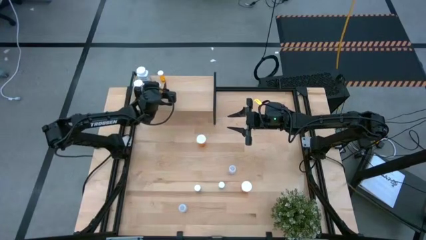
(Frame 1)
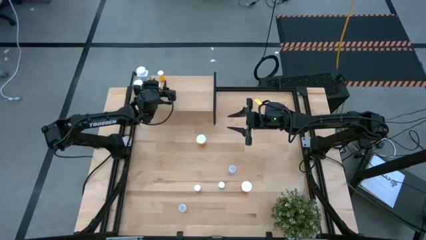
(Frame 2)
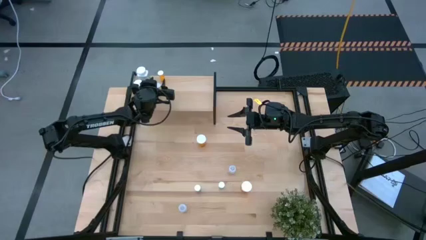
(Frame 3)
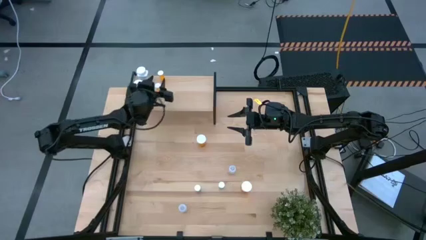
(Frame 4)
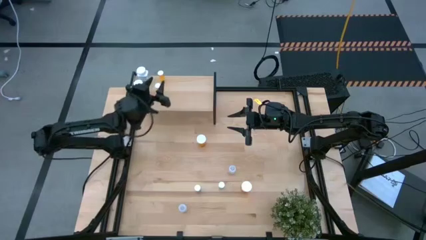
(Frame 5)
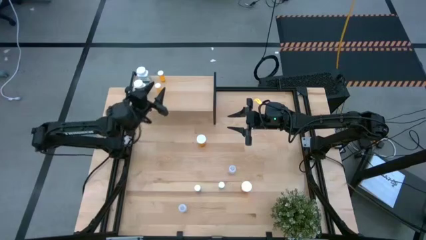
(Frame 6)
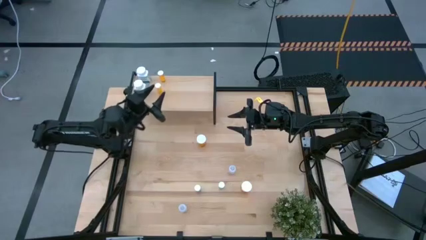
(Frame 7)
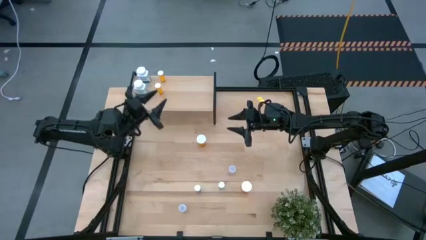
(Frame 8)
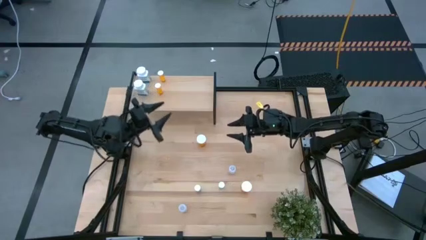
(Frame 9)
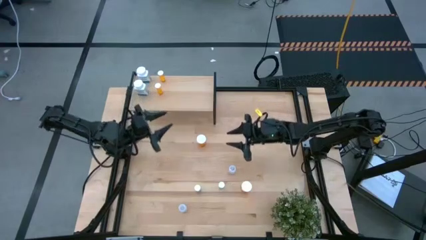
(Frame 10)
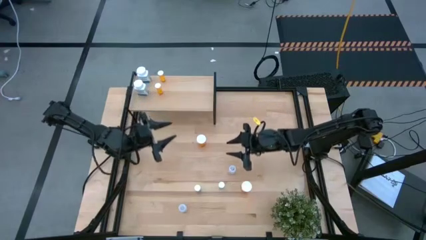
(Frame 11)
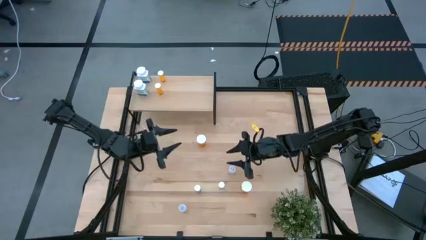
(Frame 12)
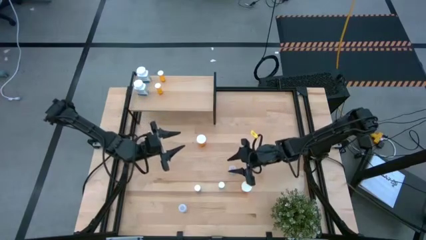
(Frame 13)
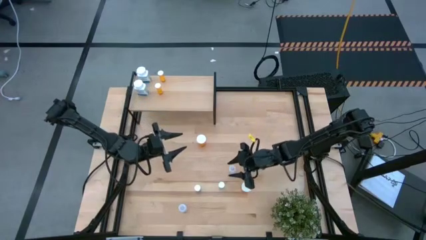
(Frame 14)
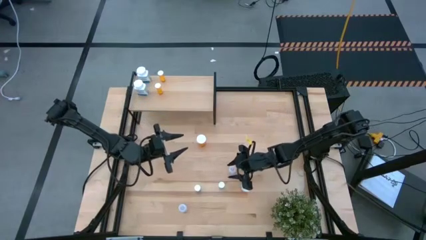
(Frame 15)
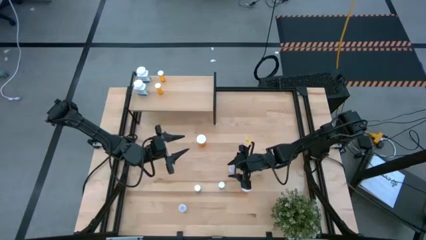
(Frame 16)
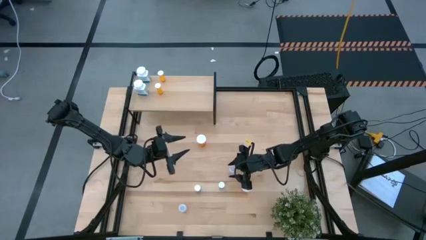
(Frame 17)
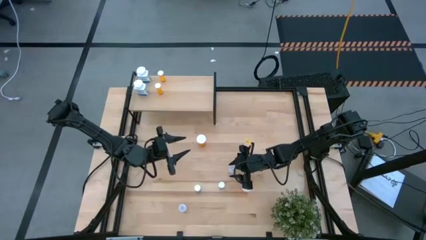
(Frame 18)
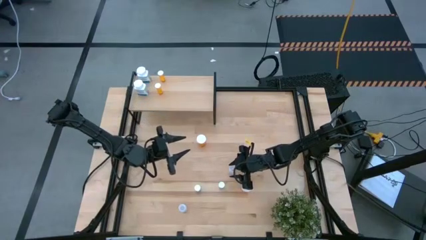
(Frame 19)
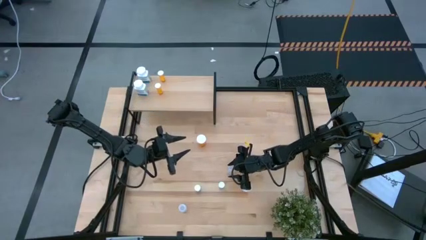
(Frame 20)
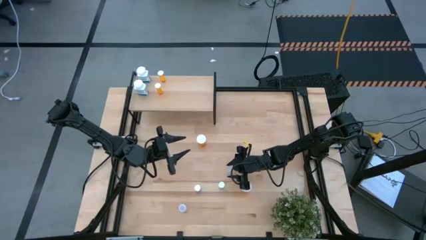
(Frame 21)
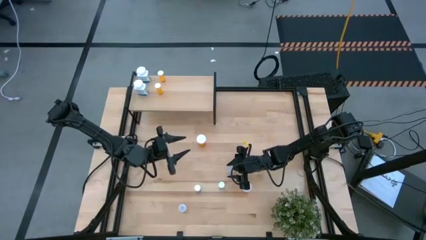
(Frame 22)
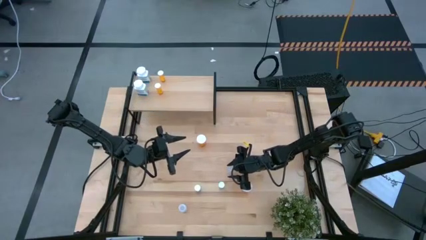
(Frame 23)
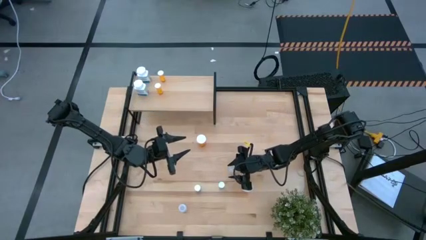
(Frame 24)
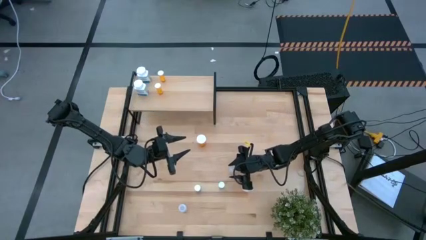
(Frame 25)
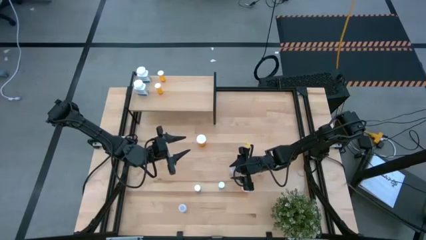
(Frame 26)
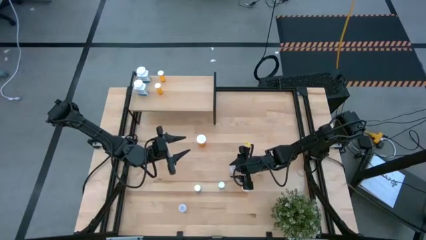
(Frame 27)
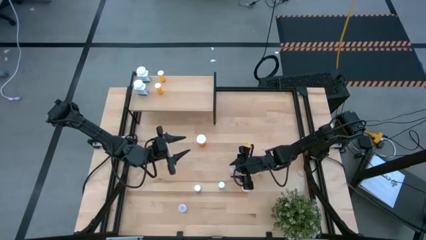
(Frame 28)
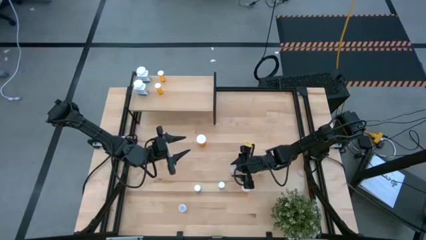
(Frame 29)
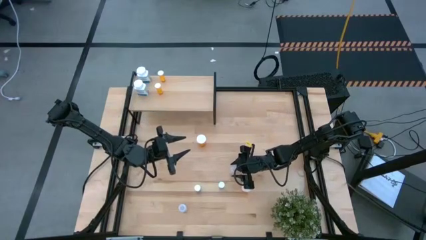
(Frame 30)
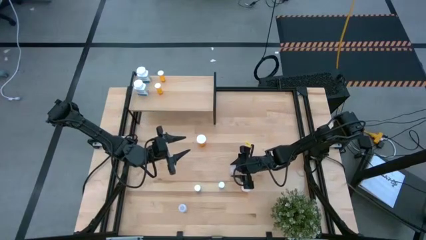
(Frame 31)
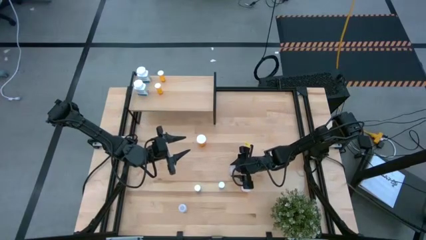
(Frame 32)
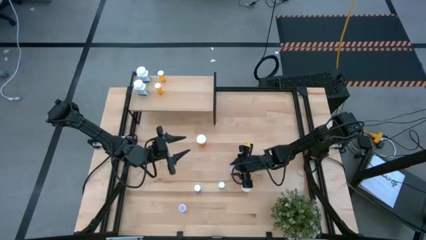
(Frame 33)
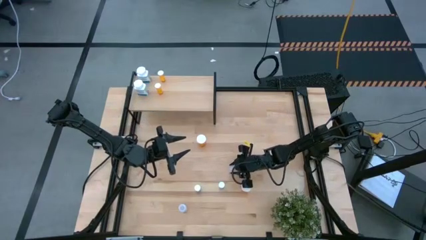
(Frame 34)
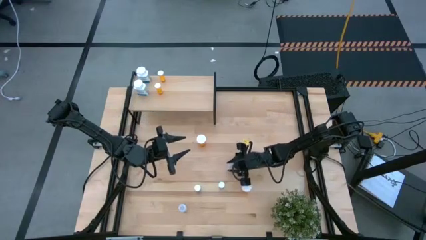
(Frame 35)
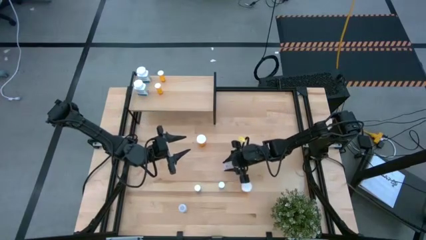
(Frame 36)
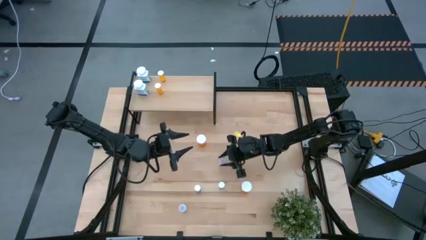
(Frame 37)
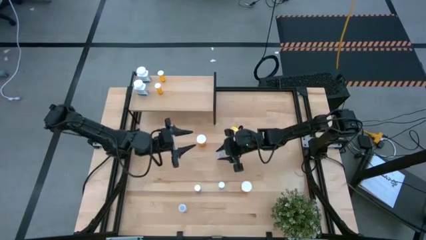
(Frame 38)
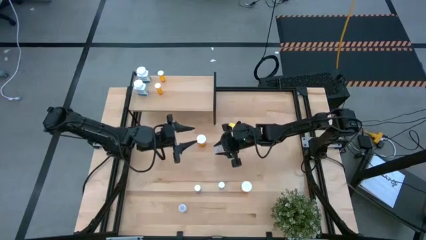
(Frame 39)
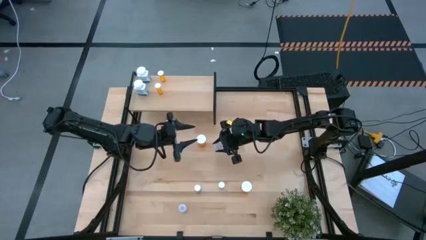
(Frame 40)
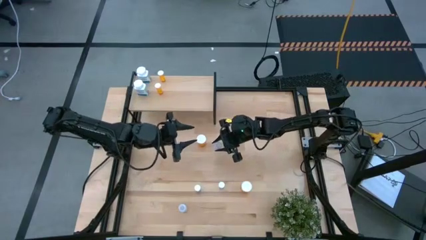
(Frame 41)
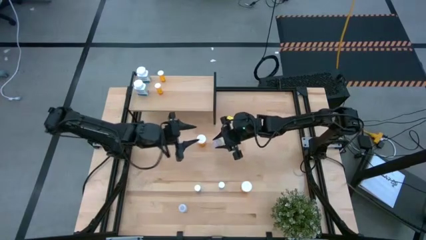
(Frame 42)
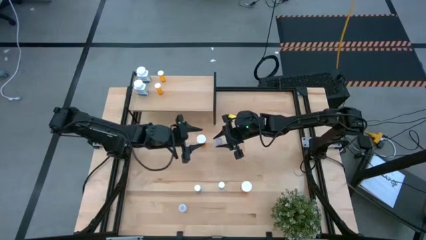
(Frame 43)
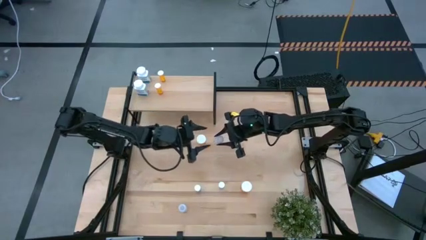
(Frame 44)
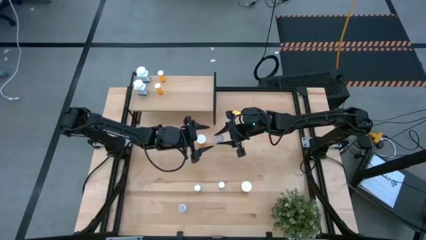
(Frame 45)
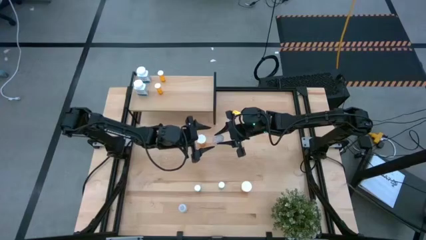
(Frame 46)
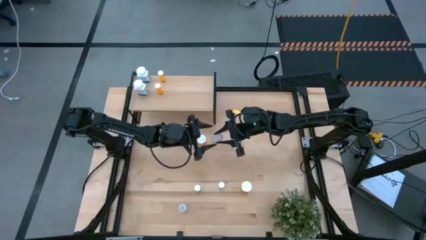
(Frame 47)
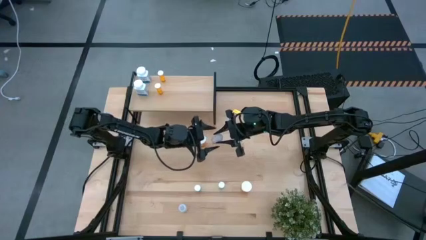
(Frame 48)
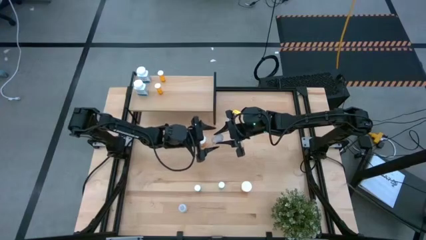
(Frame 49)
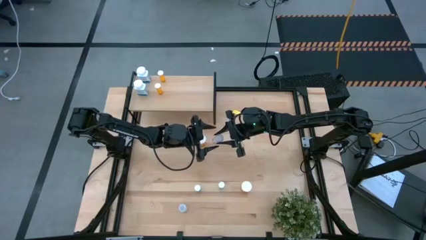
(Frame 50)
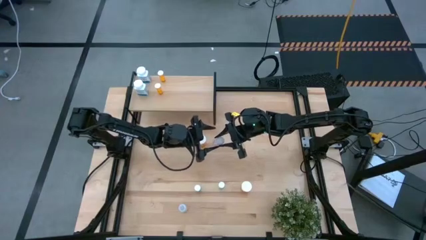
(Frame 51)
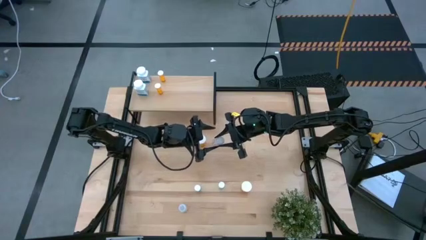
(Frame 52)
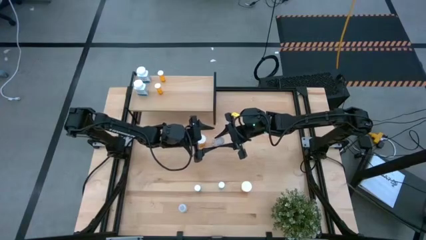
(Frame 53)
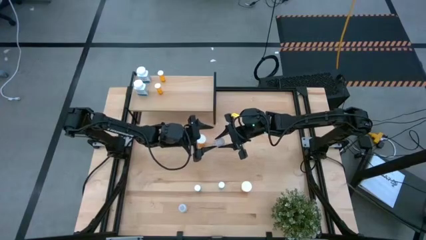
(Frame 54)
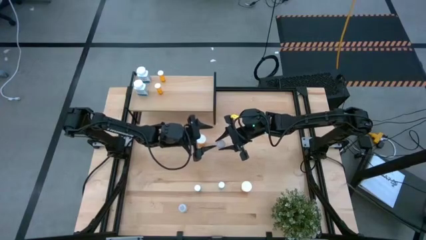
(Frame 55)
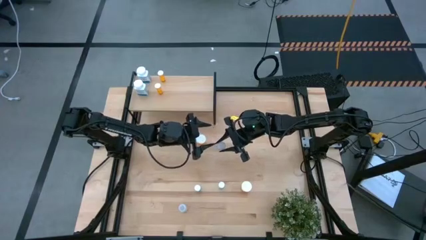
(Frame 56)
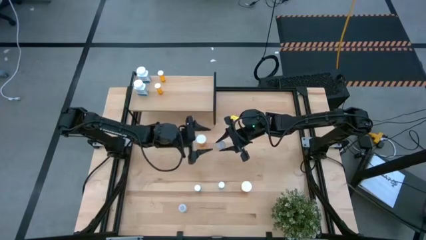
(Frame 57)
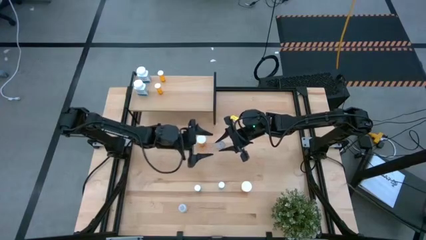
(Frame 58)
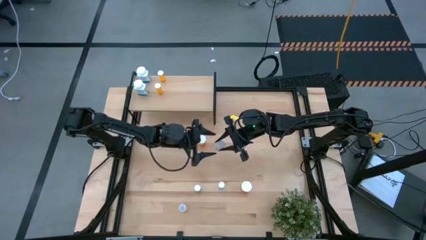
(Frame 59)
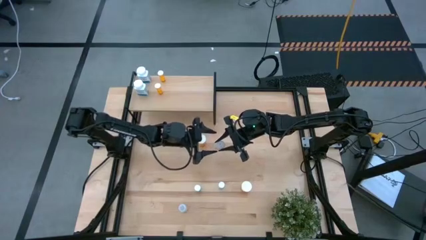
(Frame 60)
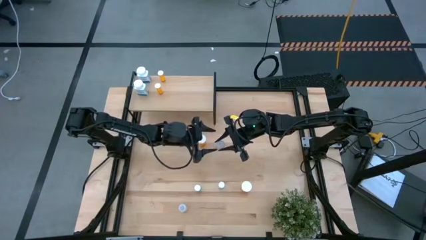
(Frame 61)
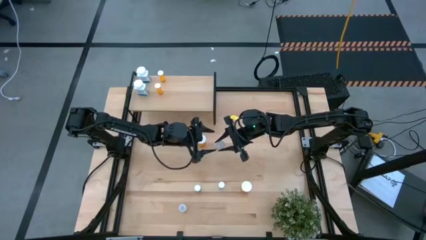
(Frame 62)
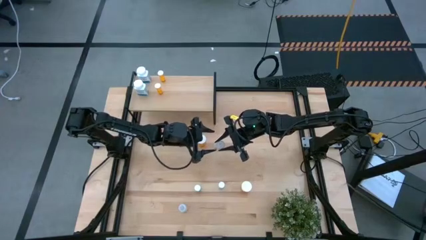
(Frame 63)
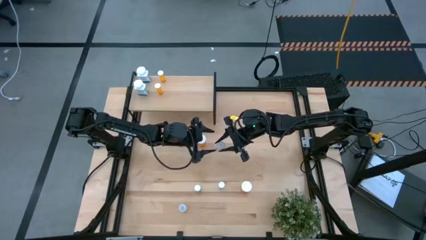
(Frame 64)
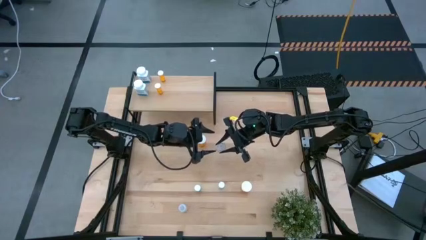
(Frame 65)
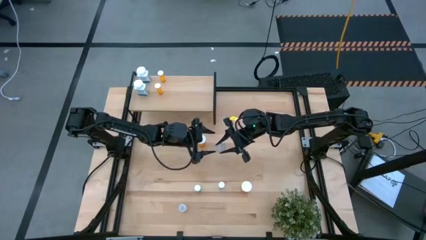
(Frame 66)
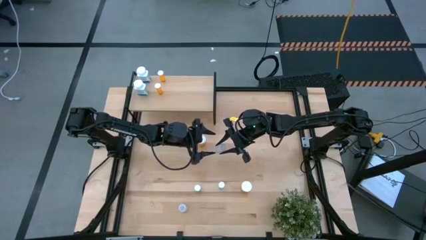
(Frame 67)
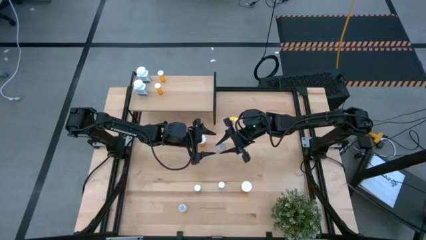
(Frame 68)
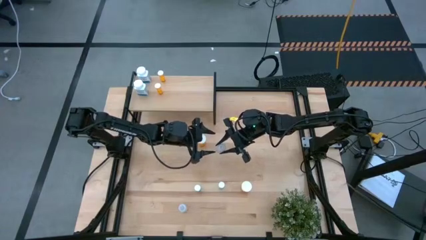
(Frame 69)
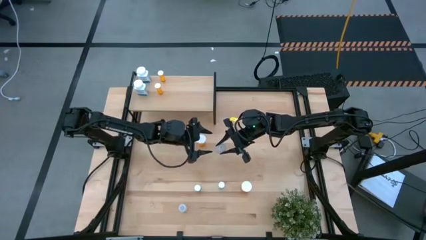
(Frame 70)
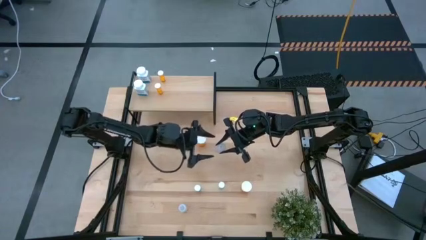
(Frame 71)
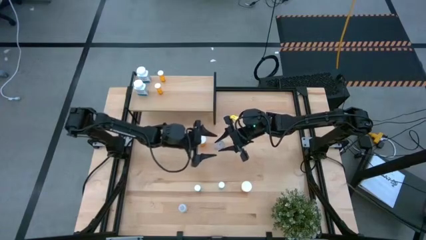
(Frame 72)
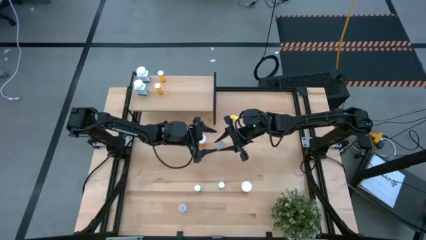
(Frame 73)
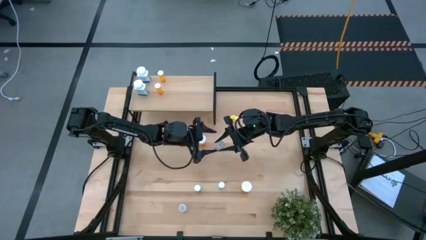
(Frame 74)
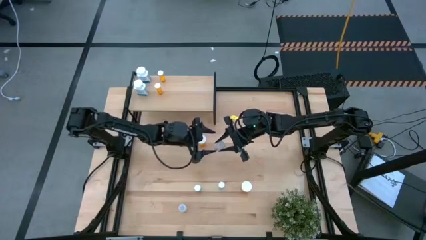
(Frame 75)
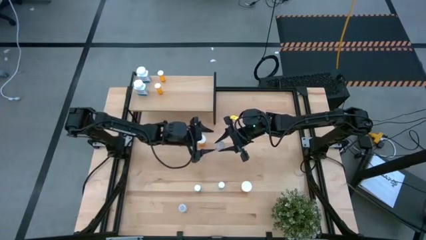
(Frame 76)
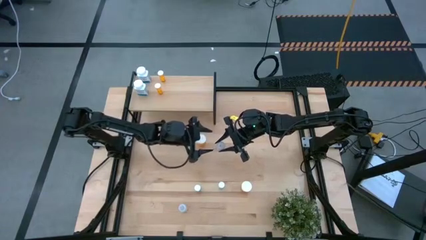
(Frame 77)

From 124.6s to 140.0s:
Task: Pick and place medicine bottles onto shelf by color
Put the top transparent pill bottle on the shelf

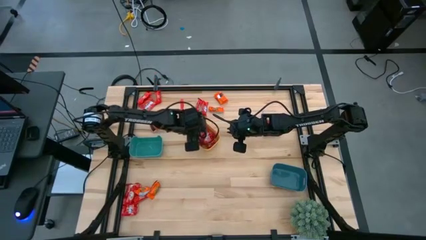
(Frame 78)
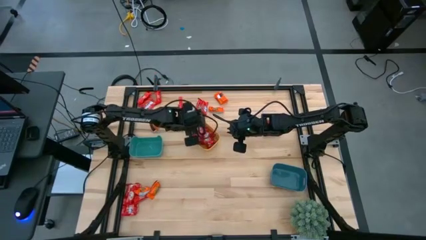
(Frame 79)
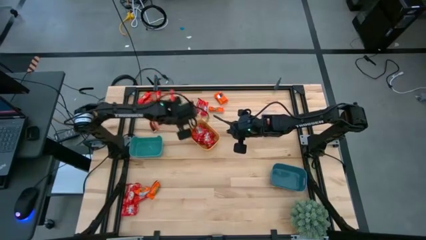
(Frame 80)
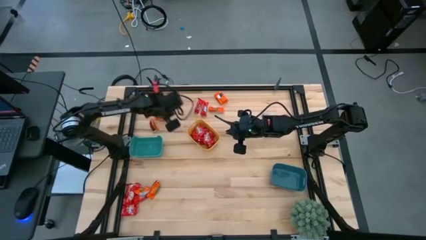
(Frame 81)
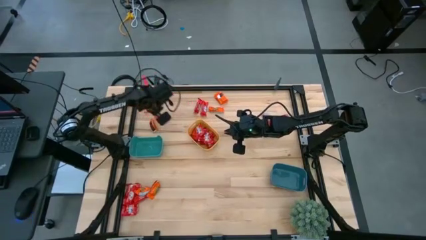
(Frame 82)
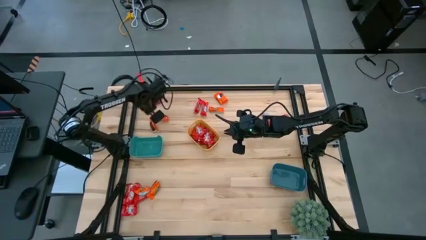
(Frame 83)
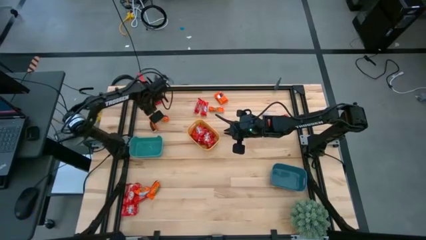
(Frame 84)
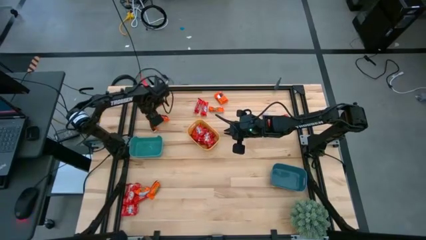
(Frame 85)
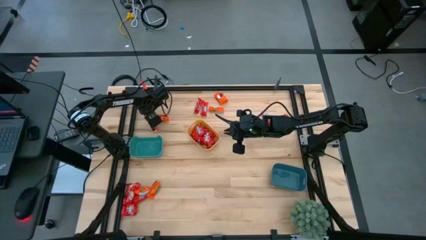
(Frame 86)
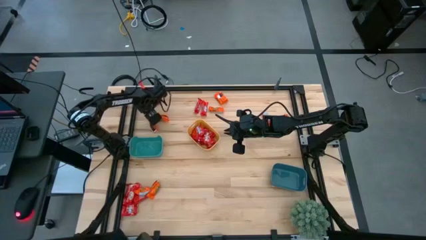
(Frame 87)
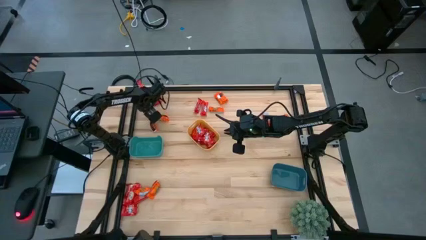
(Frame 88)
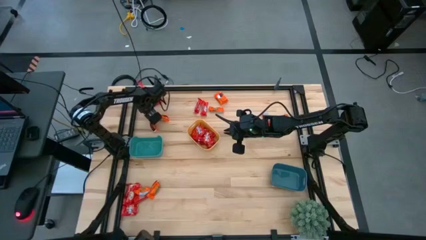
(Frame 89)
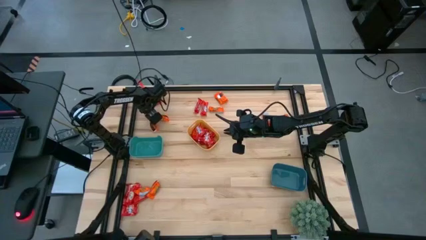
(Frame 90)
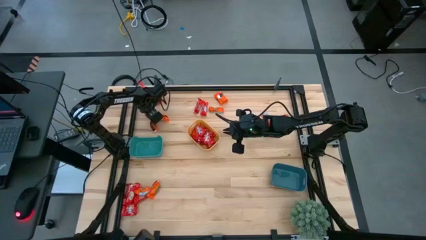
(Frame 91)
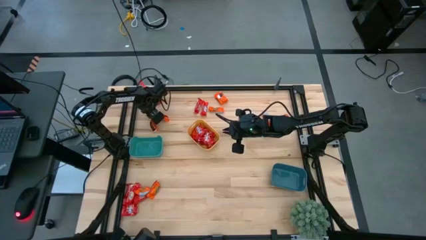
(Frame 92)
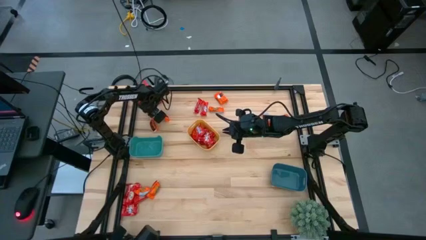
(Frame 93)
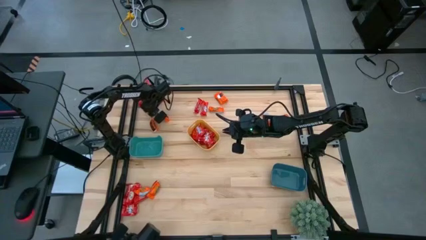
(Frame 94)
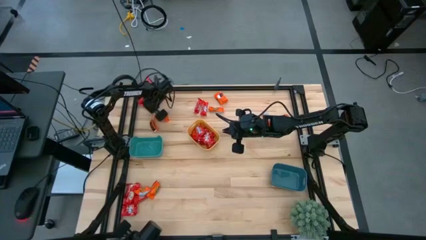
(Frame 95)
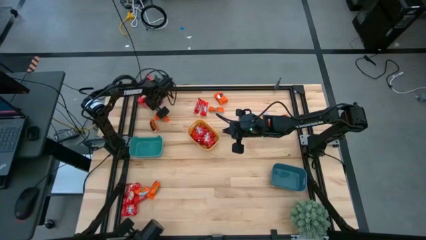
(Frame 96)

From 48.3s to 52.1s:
Task: Sort candy
Put the red candy into the yellow bin
